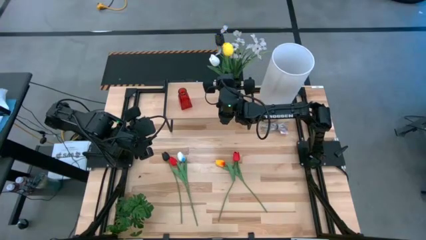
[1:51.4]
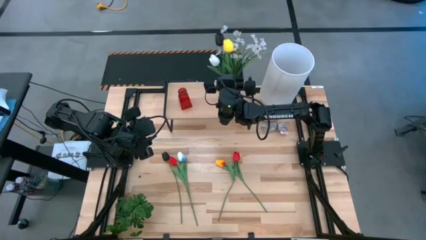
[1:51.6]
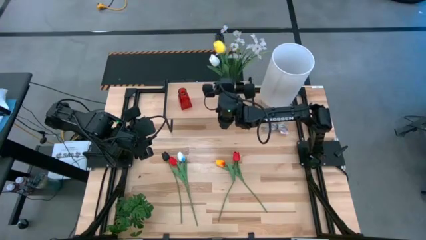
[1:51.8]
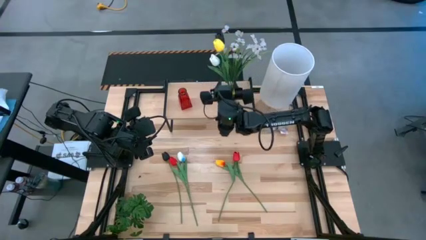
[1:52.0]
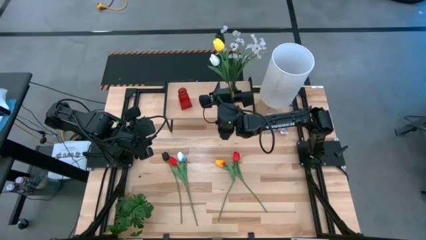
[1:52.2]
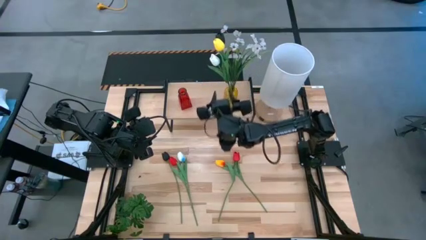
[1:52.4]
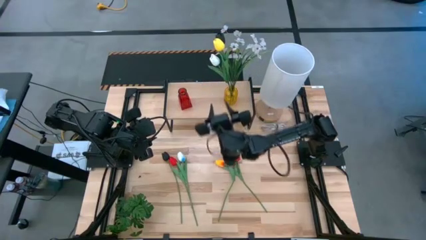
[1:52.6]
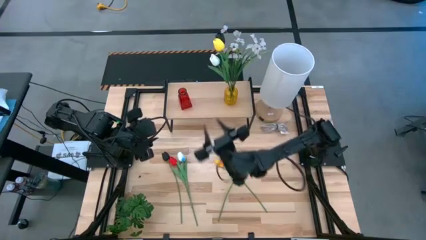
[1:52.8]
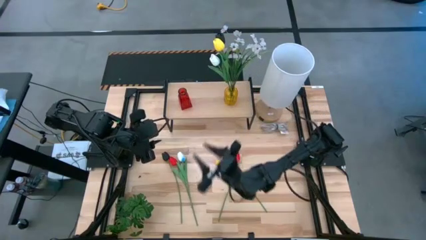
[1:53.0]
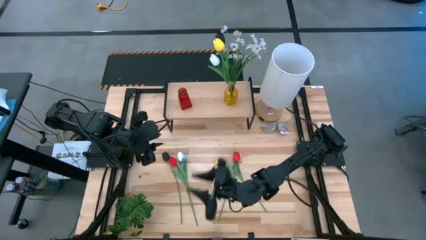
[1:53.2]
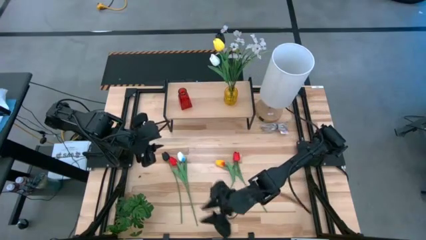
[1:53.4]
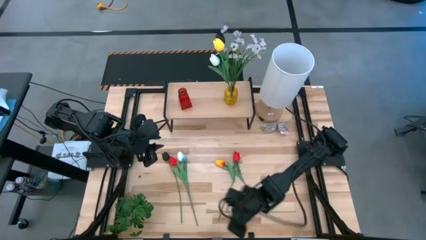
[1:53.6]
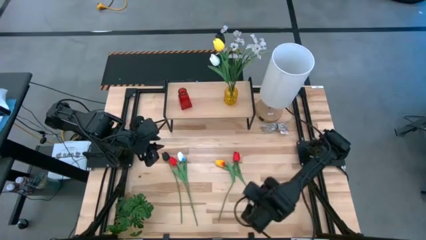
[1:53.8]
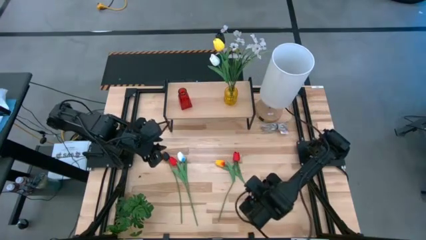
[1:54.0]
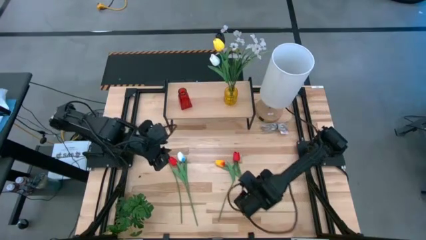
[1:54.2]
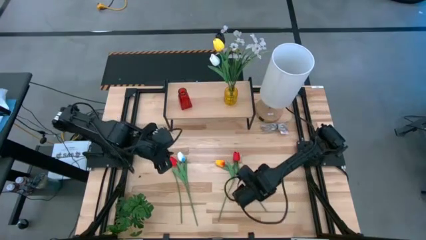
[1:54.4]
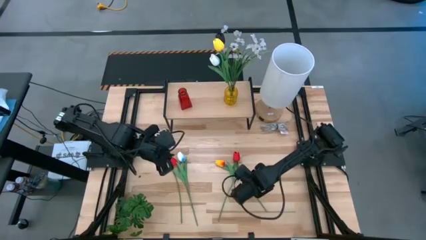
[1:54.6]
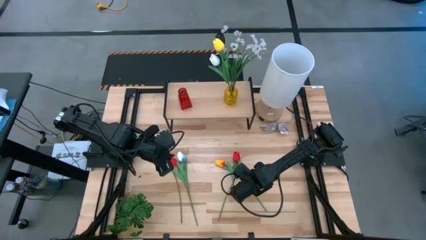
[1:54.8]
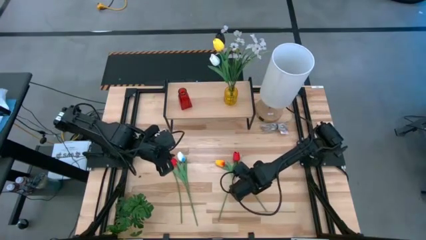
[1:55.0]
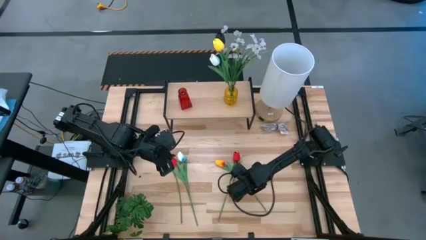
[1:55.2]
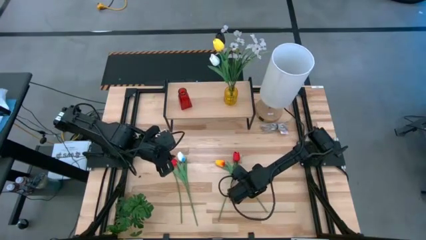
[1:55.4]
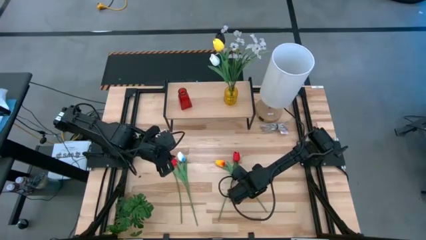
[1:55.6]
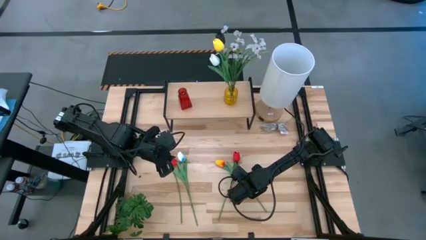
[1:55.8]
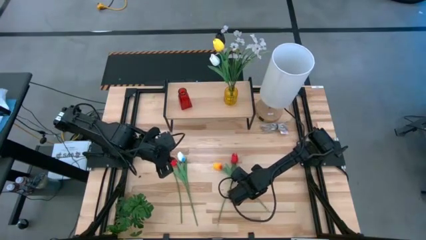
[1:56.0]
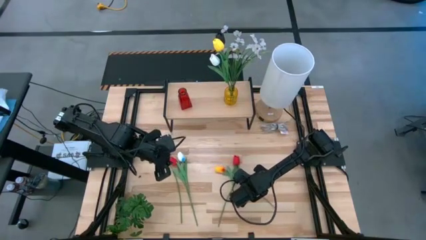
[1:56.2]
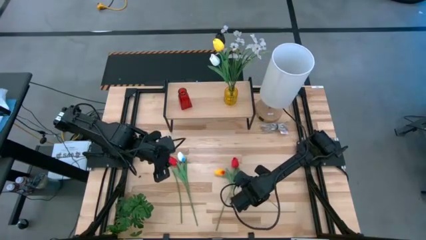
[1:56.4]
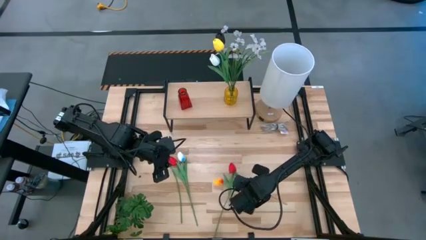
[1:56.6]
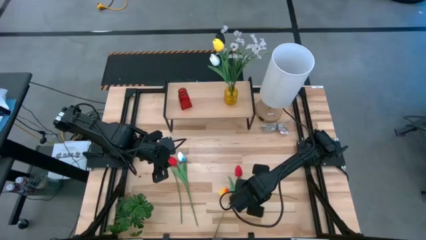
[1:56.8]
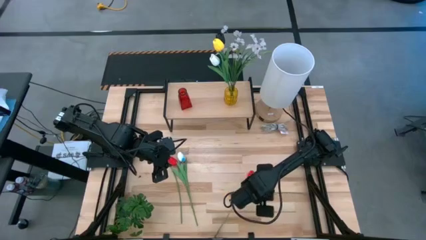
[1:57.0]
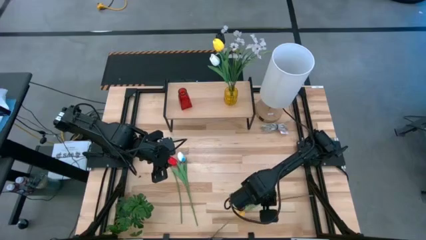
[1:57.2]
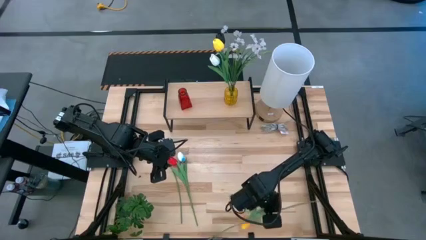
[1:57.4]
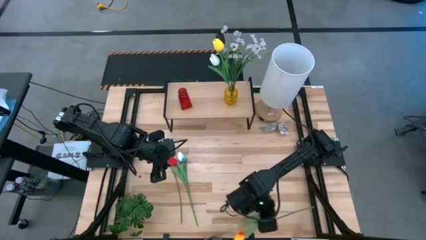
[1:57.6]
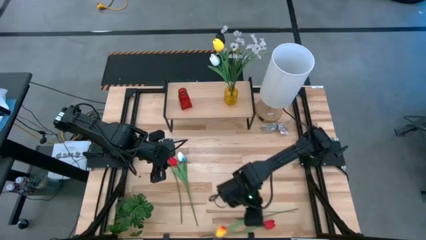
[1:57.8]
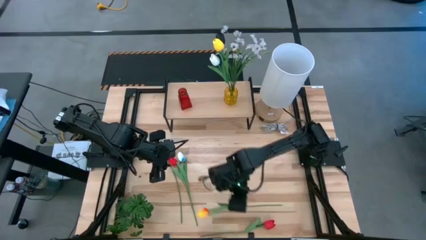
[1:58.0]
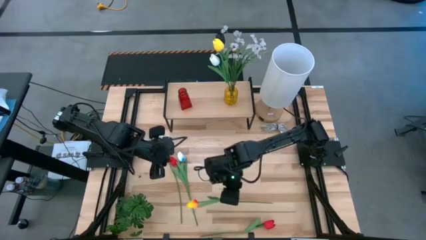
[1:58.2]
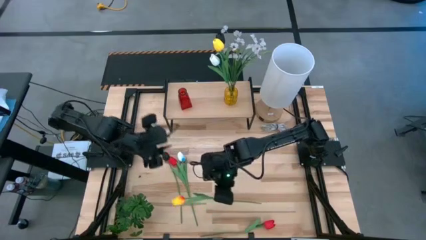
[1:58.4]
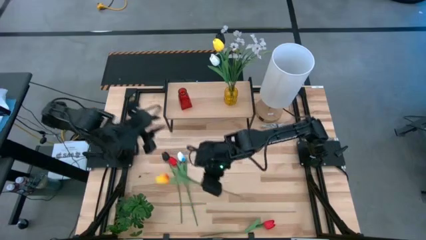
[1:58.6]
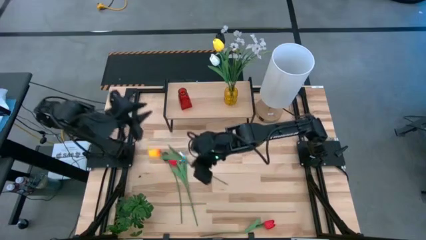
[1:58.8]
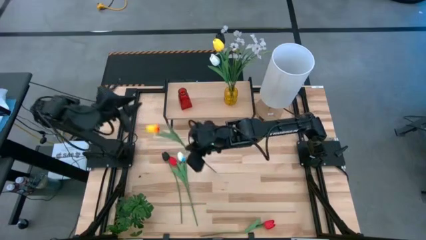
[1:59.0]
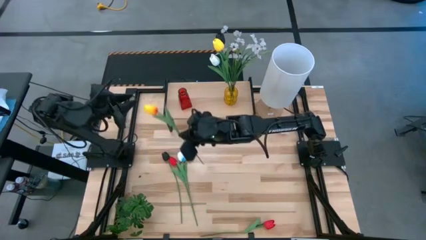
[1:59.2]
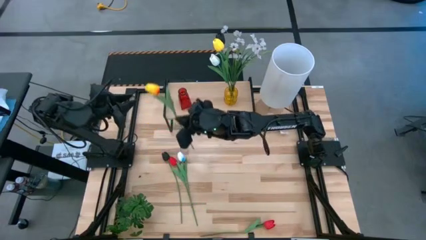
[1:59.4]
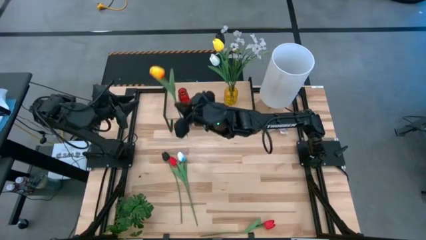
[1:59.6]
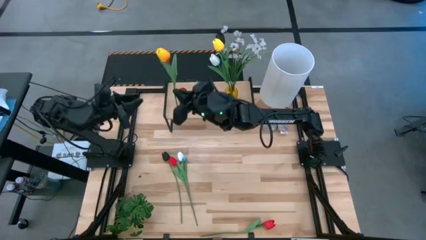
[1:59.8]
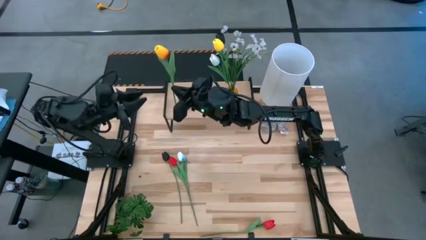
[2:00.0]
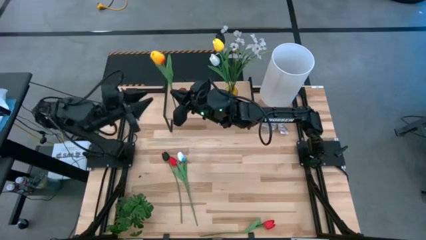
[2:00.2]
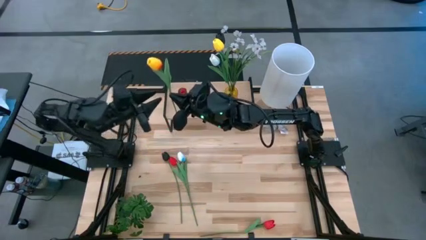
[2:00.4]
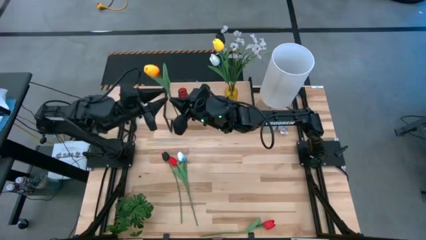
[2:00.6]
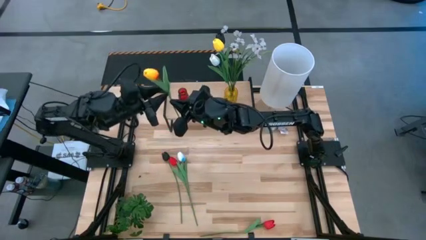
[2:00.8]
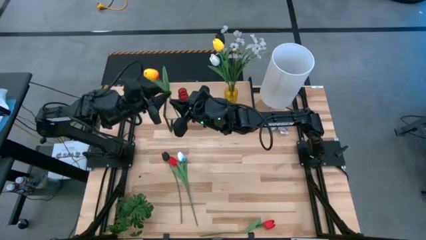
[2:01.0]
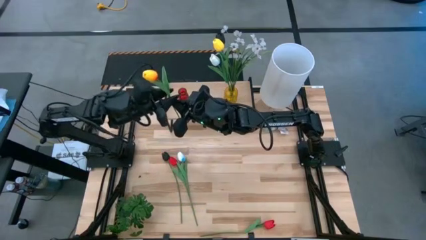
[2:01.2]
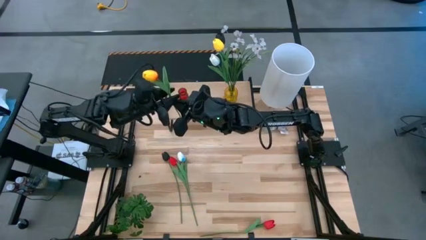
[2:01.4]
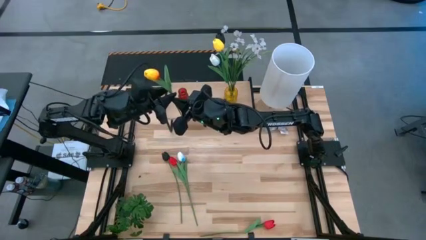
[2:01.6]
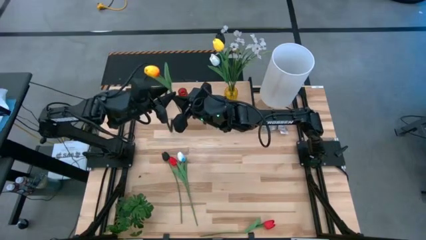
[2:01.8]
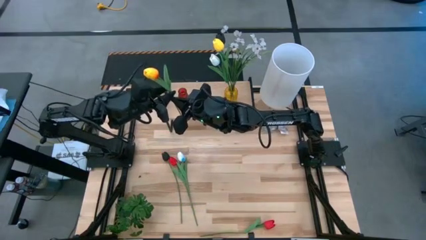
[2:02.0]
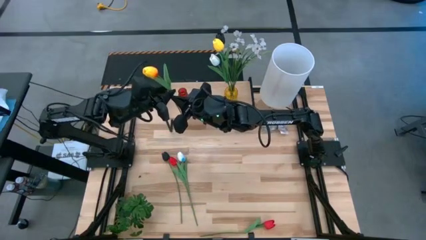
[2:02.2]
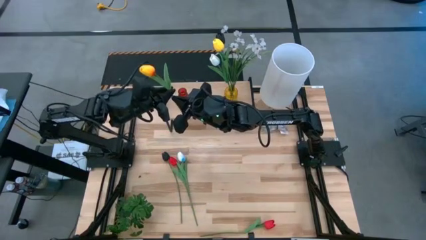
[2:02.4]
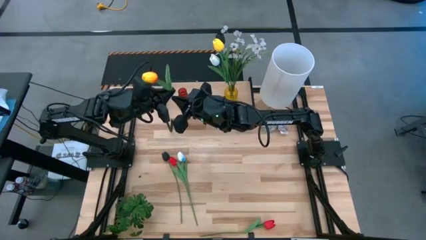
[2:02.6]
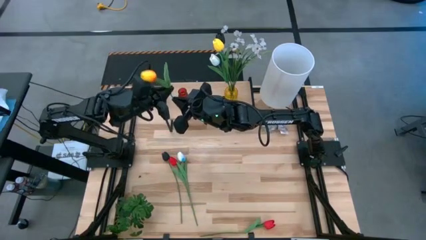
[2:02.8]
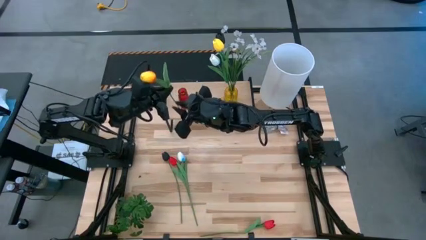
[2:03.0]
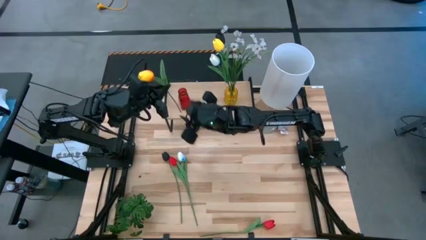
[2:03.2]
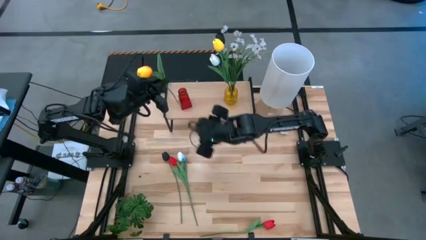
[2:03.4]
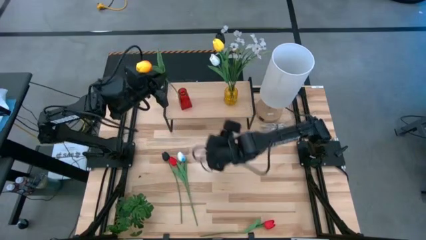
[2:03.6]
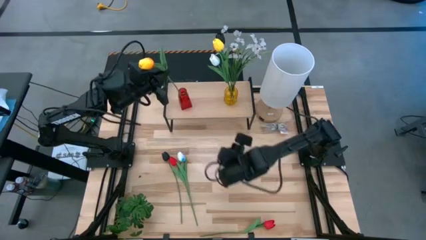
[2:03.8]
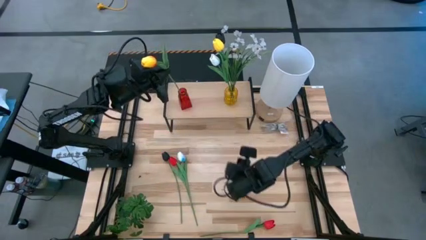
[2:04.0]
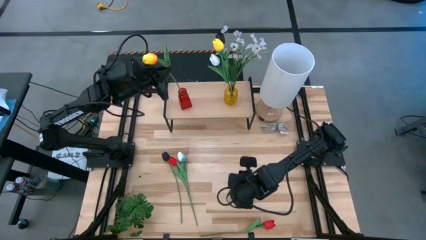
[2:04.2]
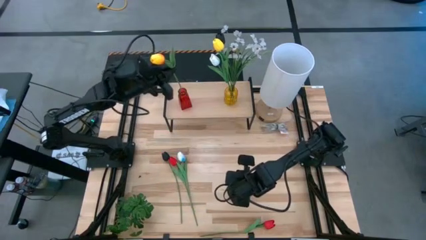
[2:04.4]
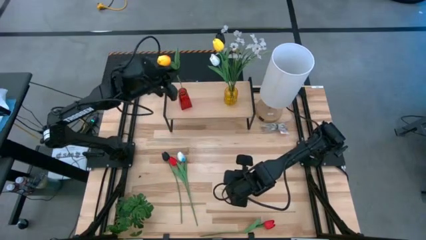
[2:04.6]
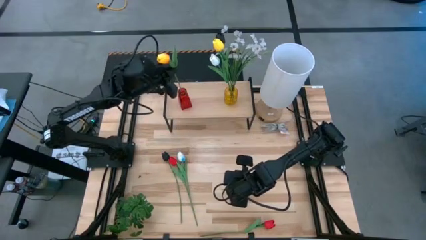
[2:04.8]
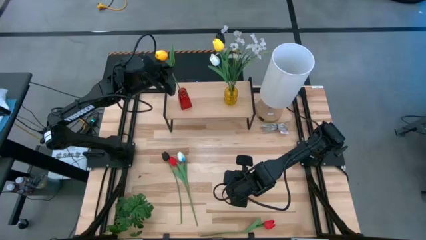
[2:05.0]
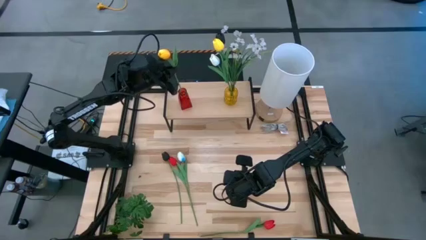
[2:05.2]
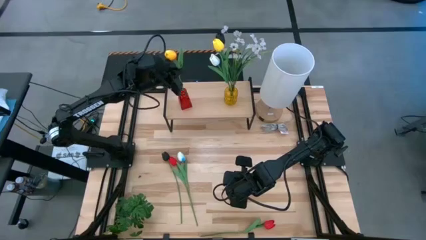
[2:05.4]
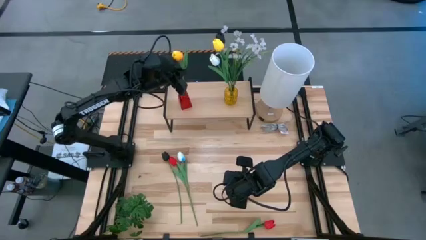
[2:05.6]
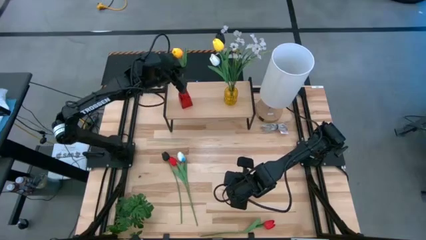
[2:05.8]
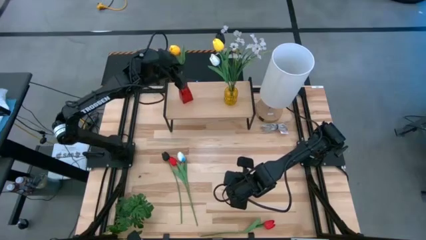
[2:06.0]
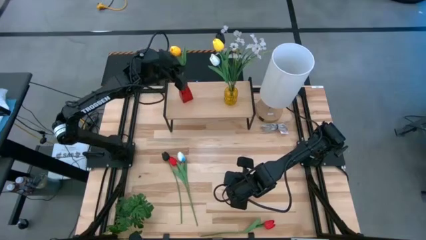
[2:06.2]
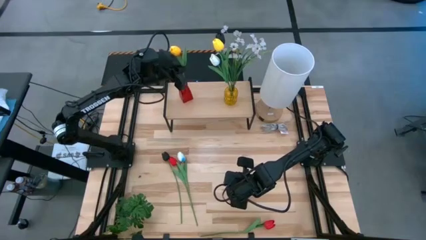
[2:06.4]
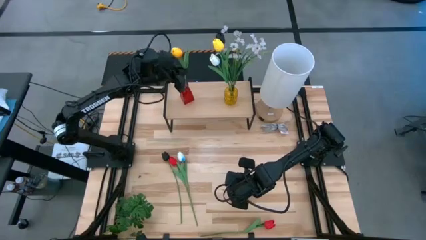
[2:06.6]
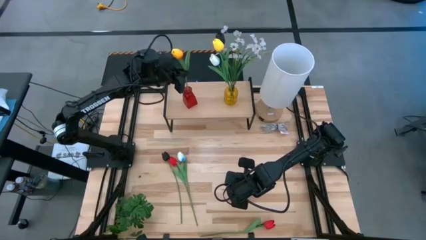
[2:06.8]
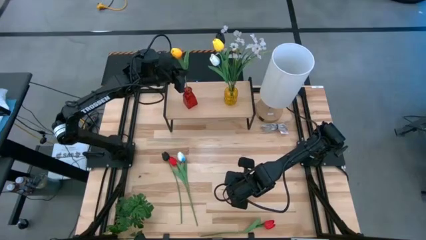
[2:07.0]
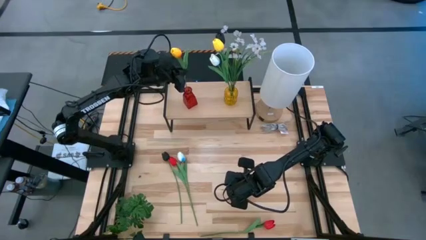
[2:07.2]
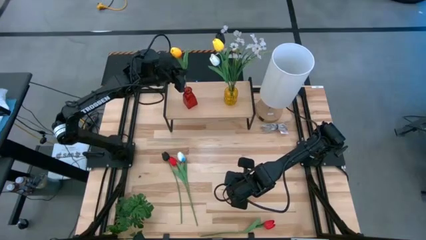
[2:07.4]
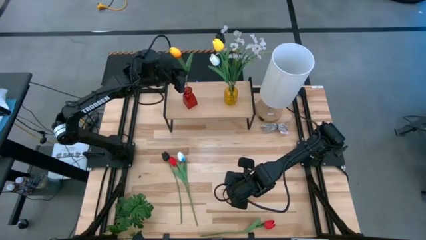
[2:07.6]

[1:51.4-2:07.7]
Task: Pick and place flowers into a vace then onto a shelf
Put the yellow tulip into the red flower vase
